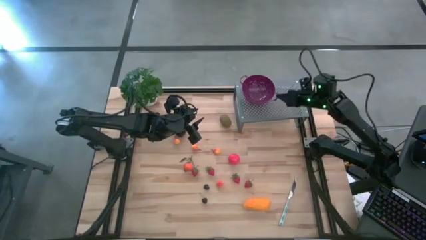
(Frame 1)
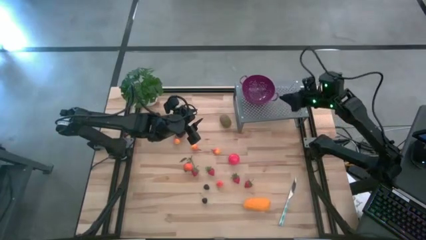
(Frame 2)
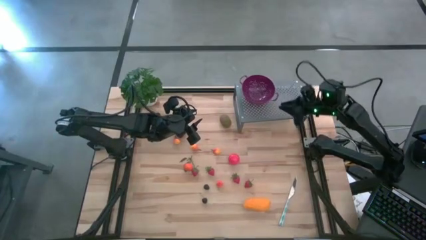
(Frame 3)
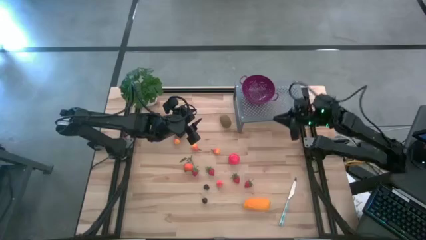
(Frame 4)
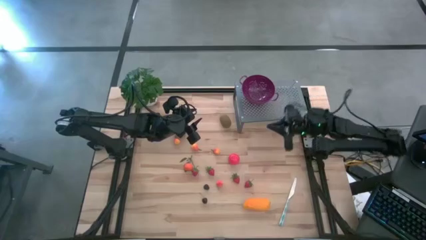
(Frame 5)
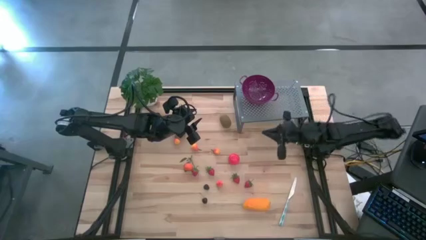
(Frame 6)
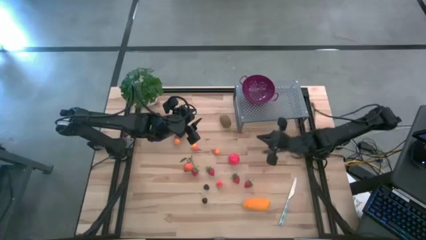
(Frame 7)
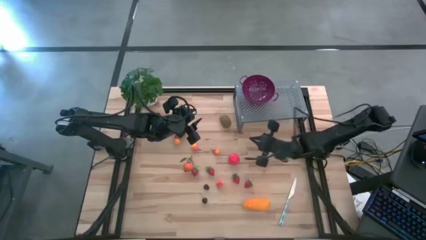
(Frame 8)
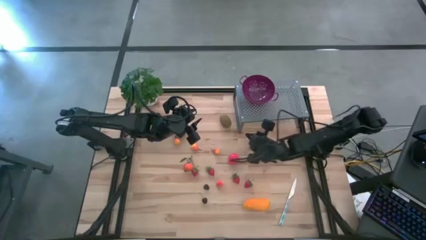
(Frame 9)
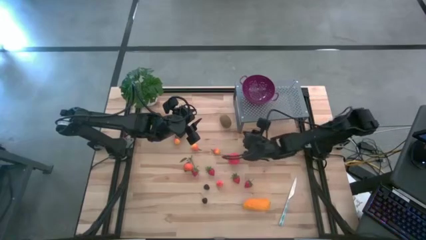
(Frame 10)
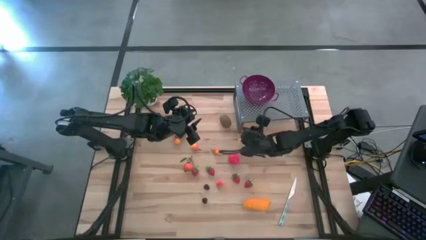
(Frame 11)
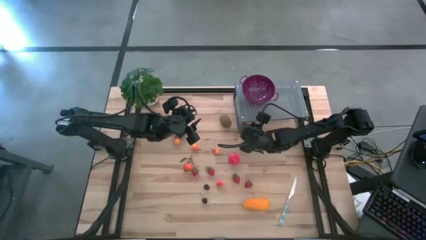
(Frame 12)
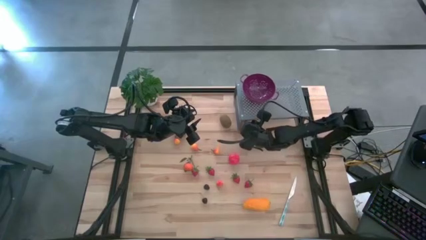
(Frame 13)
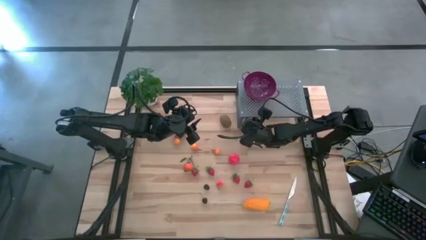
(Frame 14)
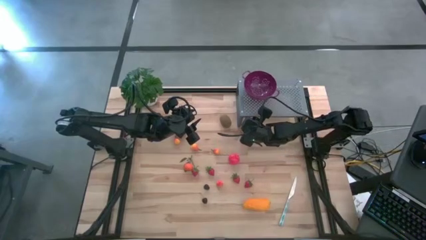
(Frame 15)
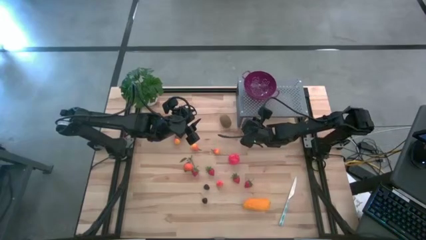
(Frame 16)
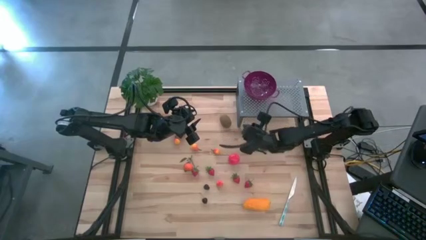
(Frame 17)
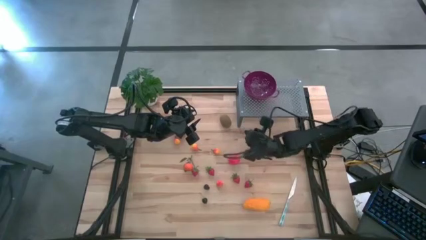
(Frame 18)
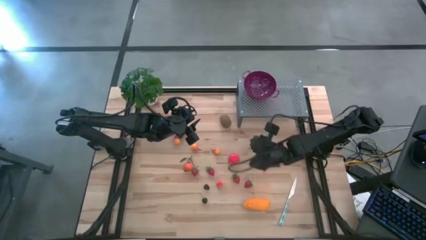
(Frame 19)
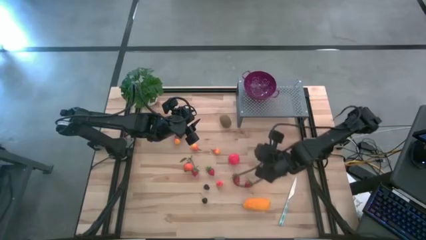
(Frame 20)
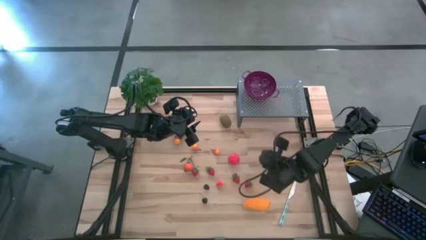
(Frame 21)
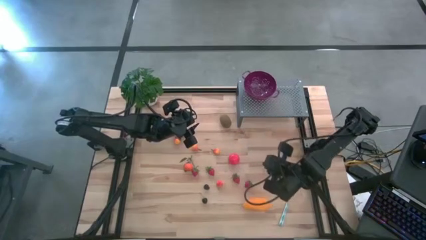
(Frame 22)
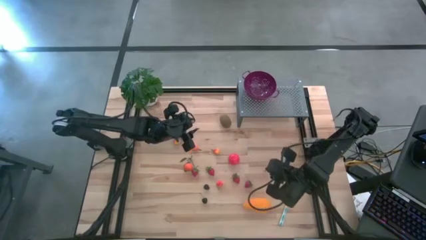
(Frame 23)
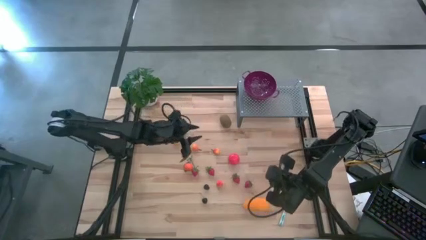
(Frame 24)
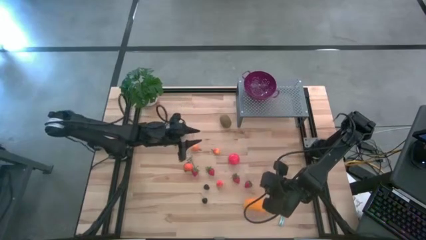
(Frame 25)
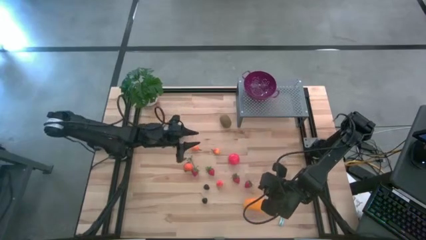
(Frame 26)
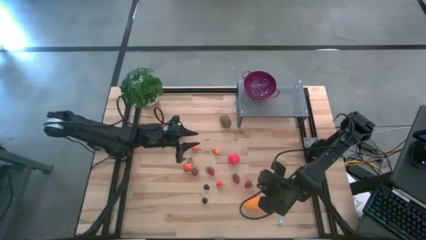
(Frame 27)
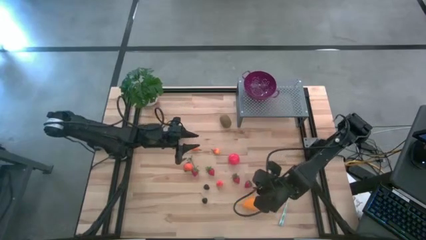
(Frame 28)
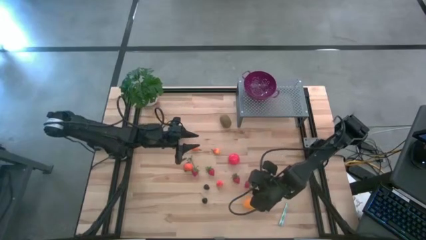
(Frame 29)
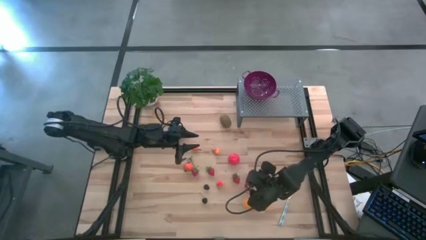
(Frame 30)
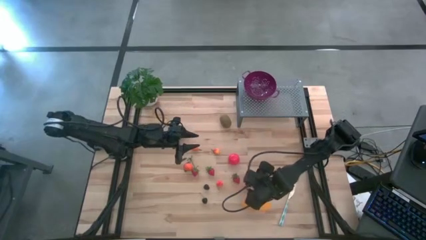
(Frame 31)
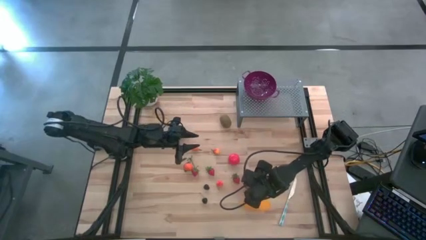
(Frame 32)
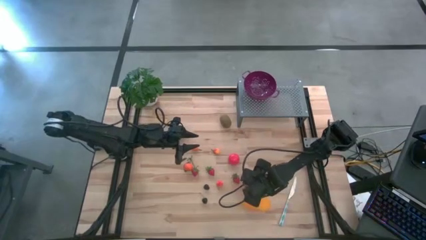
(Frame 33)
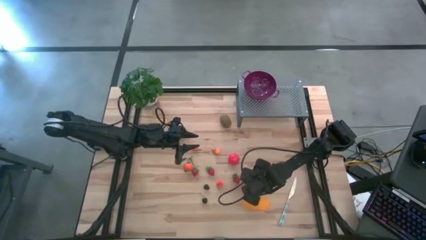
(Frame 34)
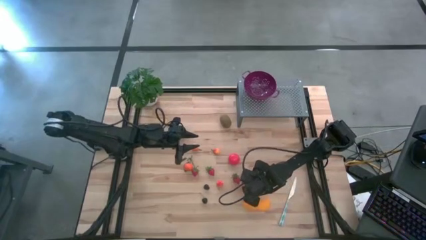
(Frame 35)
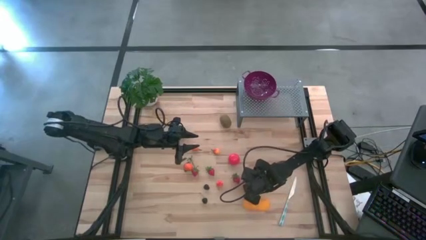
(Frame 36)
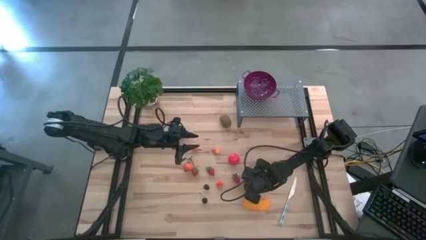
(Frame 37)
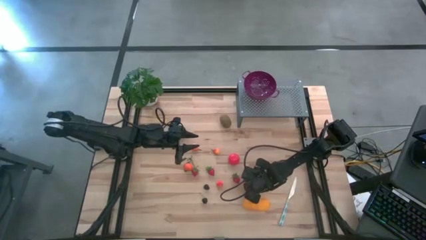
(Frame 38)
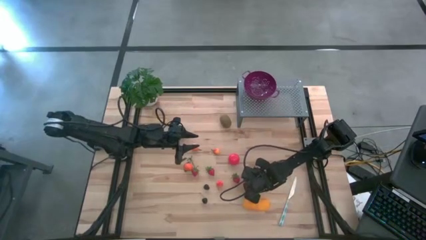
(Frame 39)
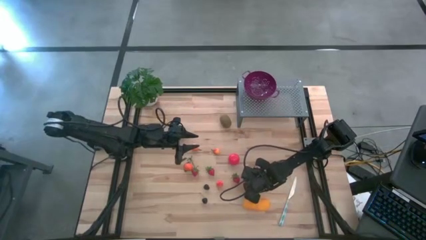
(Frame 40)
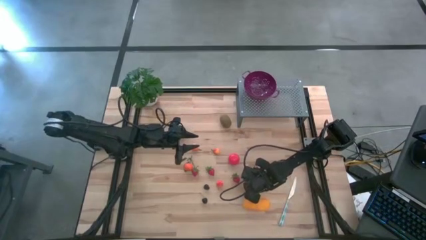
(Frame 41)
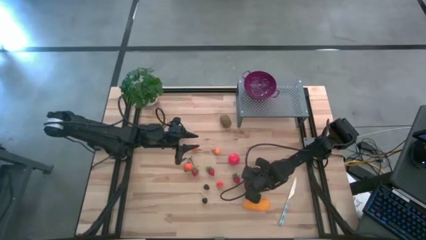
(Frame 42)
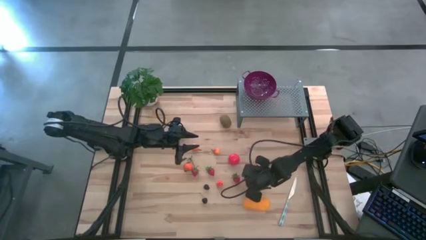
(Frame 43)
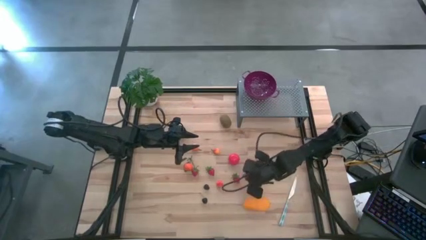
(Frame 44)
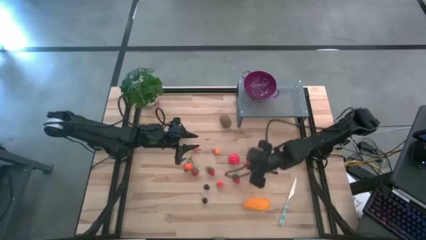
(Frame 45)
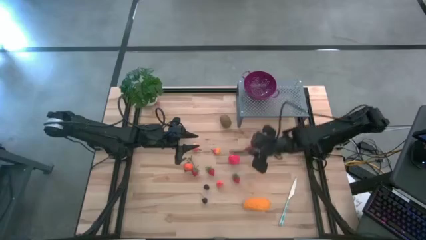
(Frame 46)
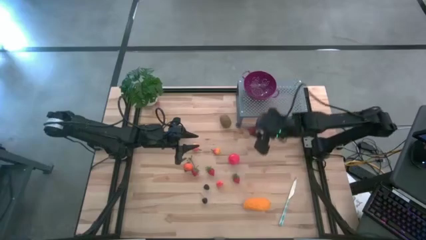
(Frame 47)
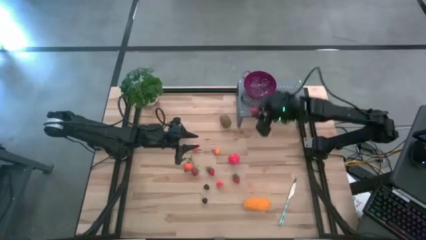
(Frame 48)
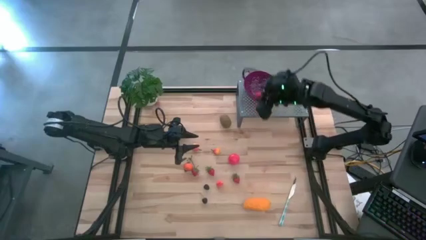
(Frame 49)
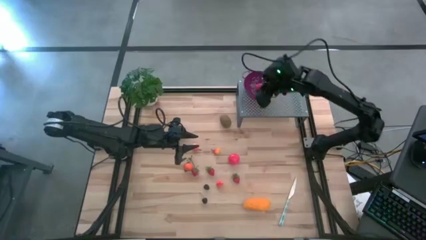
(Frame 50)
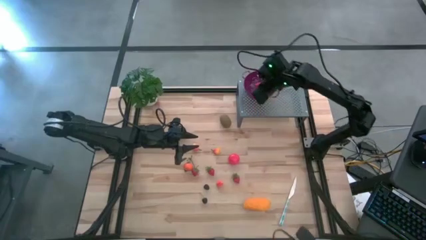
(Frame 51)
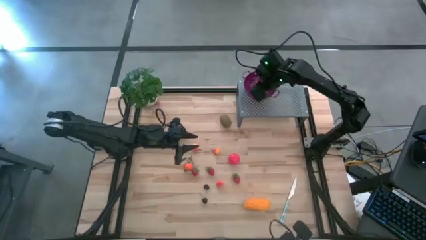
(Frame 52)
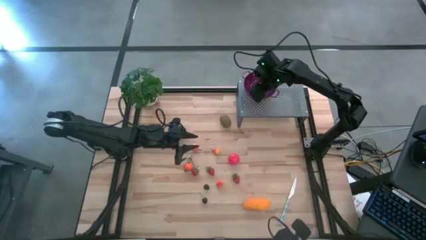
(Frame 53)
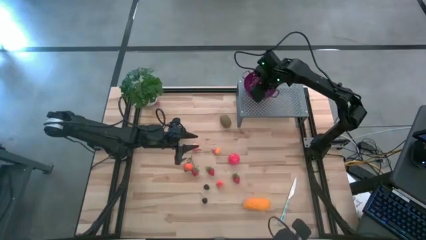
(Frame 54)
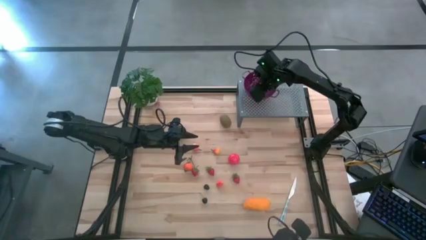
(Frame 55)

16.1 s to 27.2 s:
Task: Pick & Place Fruit
Put the strawberry into the violet strainer bowl on the shelf

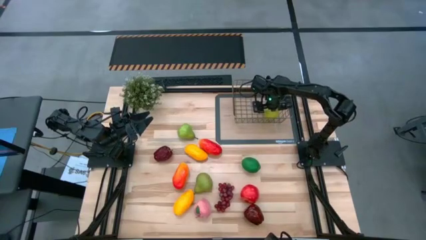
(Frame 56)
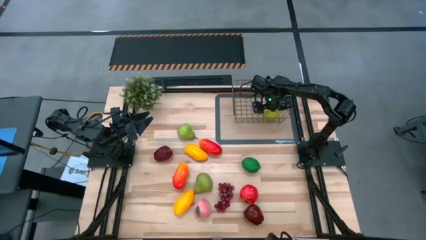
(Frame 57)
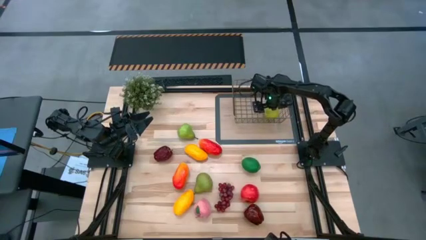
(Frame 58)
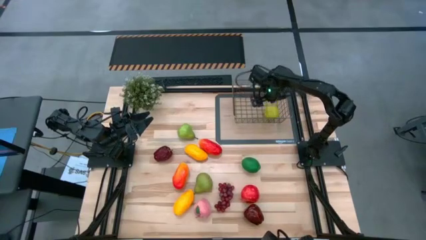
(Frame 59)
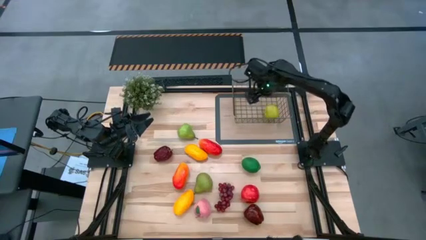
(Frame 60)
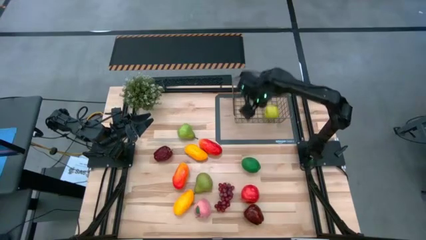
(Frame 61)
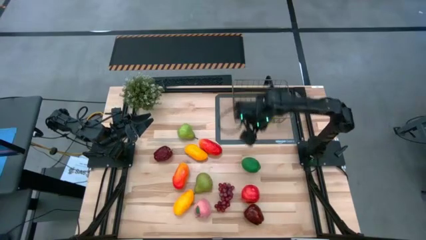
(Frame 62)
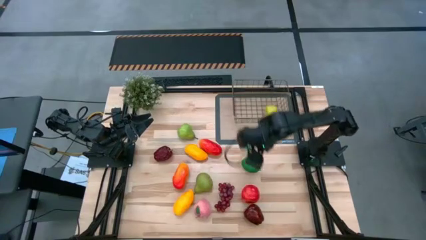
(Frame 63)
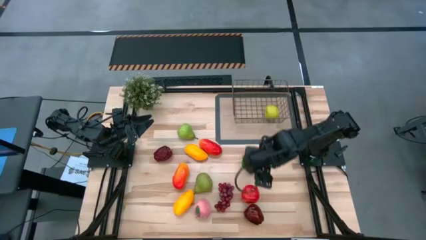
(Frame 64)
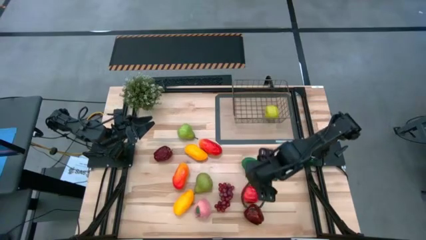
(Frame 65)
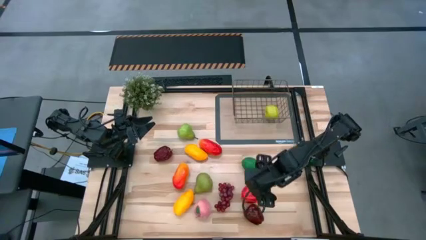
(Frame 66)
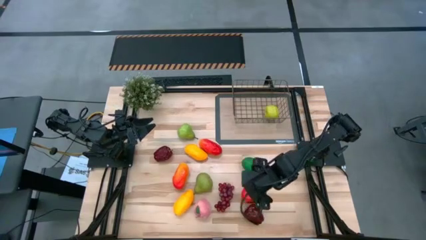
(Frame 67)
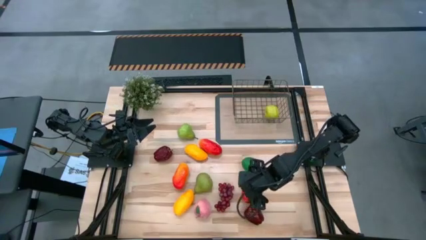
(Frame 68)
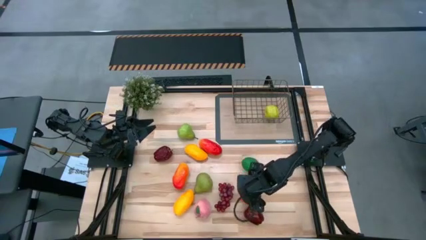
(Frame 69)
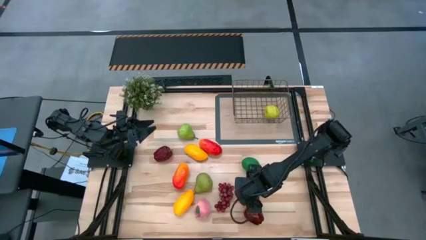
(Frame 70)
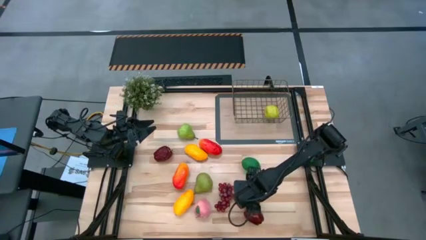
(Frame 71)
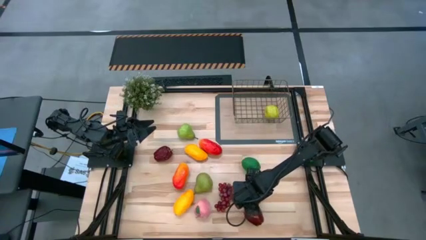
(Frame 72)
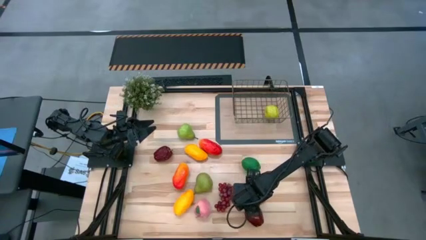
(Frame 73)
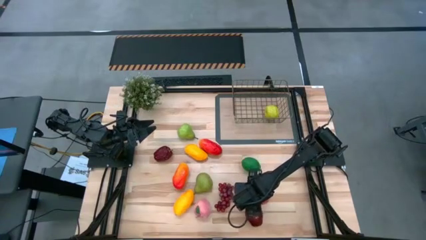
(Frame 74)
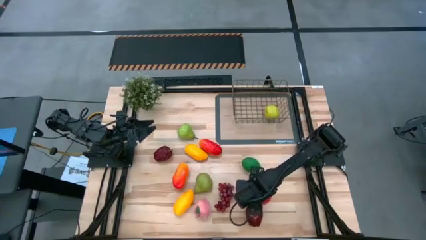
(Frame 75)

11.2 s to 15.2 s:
Task: Build produce basket
Put the red apple into the gold wire basket
